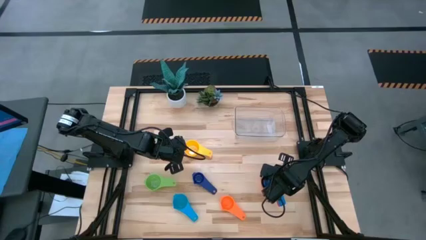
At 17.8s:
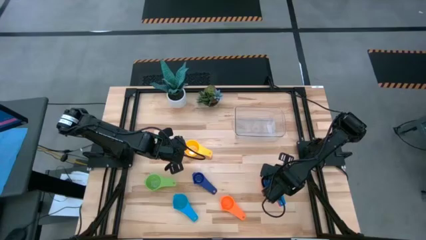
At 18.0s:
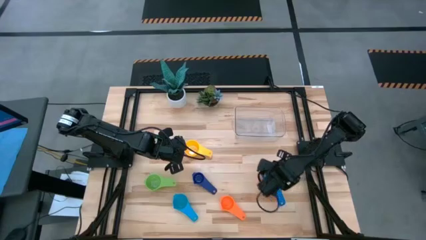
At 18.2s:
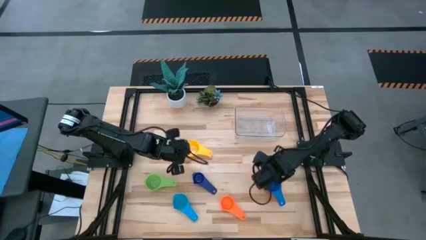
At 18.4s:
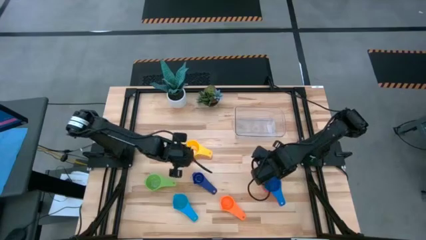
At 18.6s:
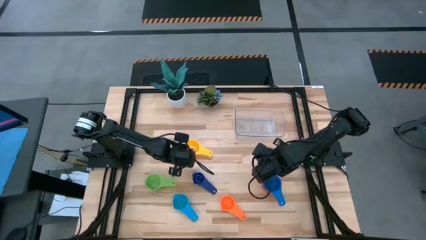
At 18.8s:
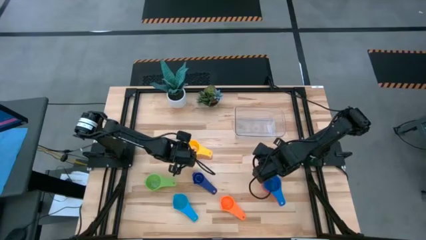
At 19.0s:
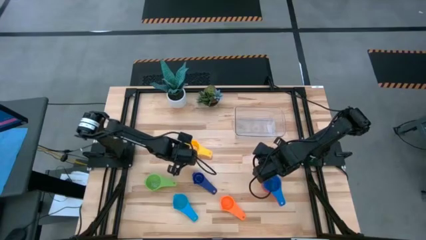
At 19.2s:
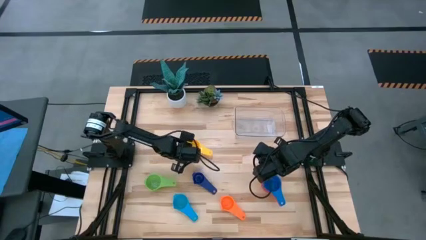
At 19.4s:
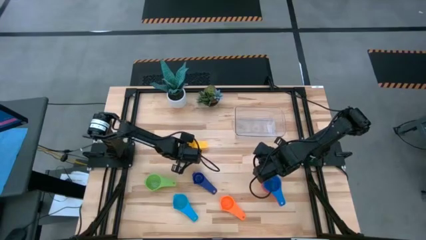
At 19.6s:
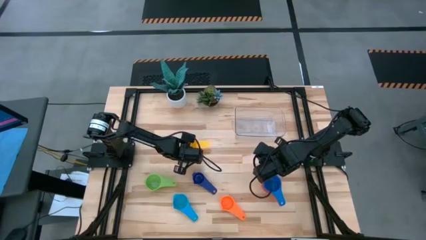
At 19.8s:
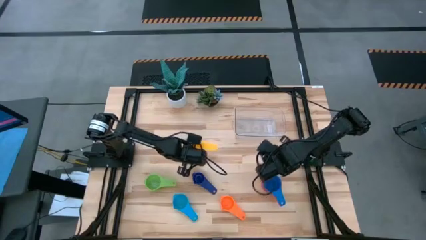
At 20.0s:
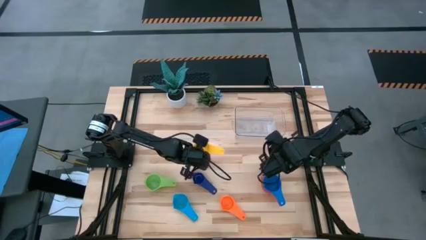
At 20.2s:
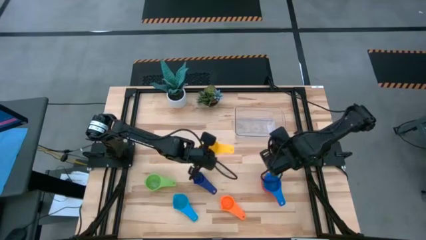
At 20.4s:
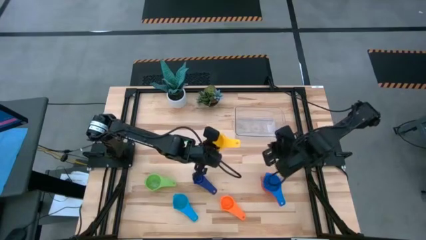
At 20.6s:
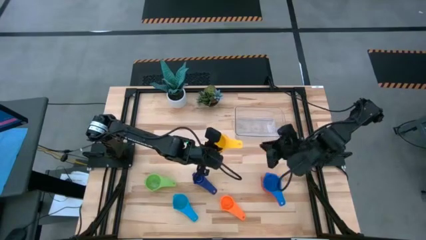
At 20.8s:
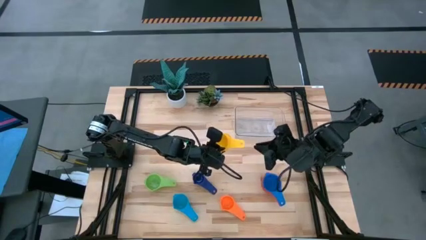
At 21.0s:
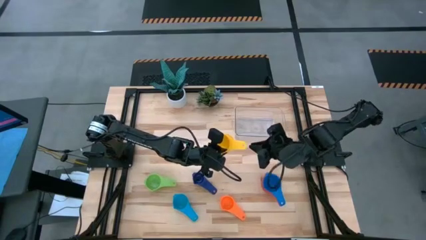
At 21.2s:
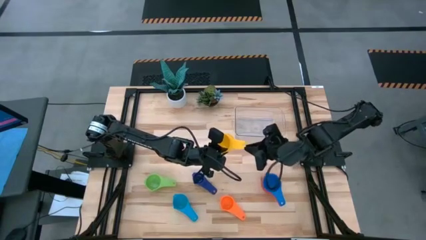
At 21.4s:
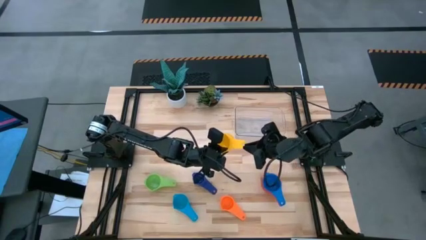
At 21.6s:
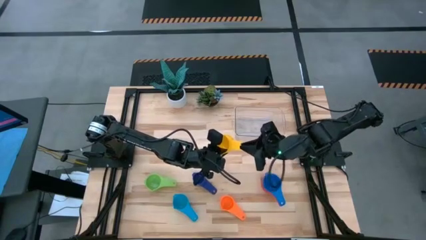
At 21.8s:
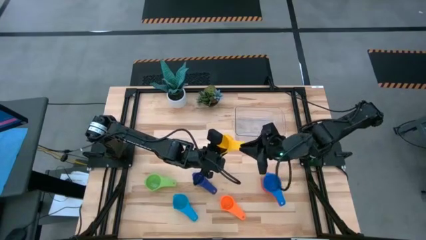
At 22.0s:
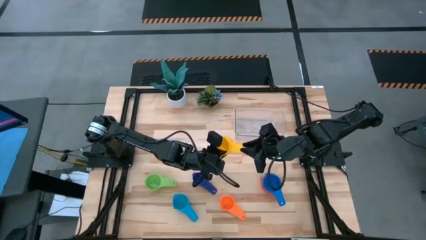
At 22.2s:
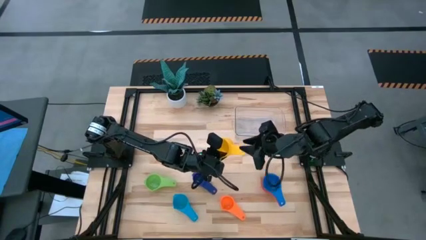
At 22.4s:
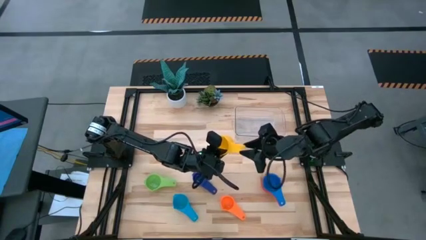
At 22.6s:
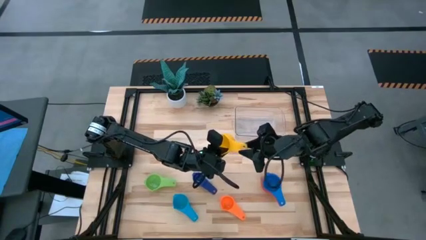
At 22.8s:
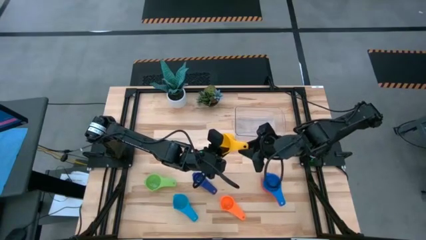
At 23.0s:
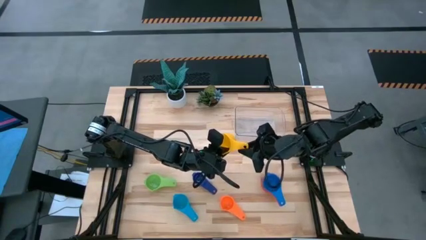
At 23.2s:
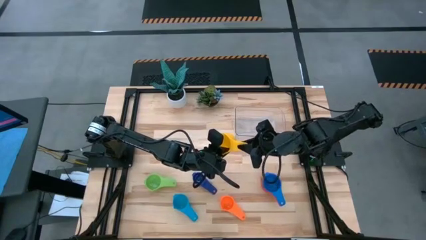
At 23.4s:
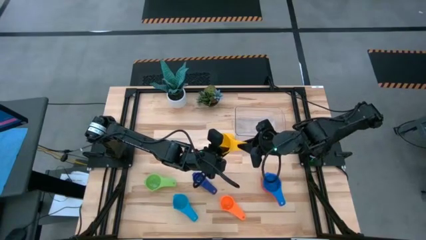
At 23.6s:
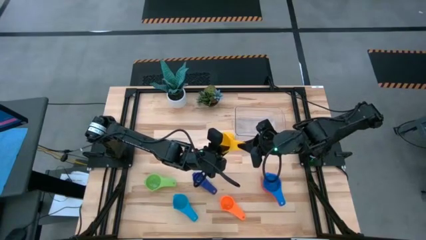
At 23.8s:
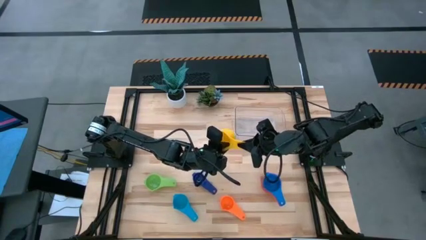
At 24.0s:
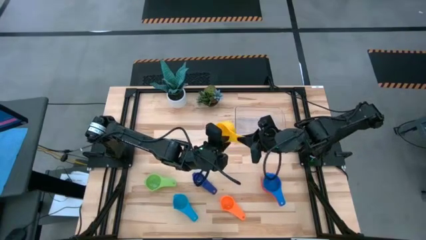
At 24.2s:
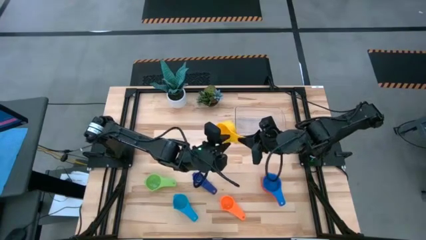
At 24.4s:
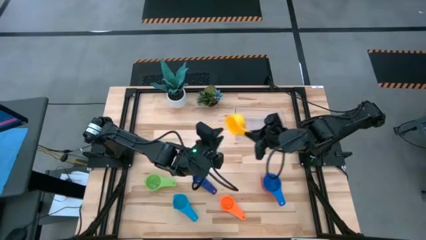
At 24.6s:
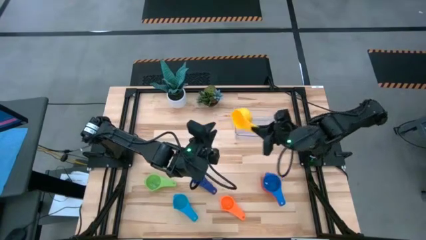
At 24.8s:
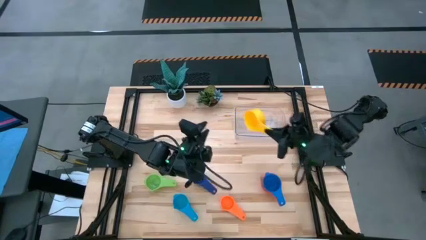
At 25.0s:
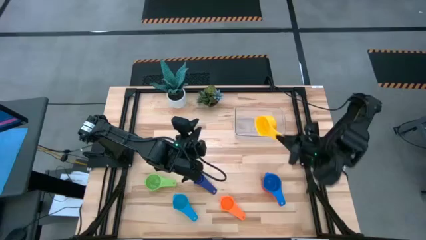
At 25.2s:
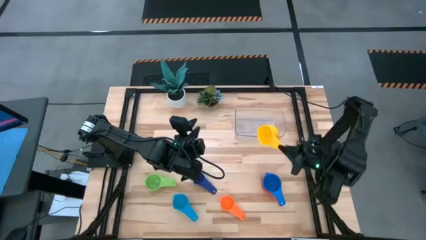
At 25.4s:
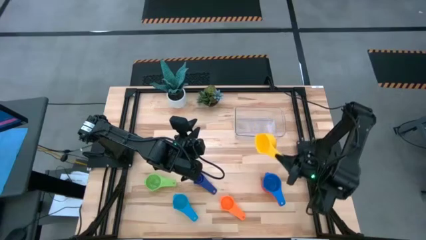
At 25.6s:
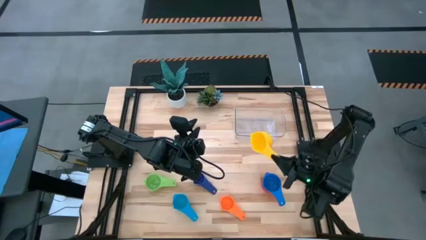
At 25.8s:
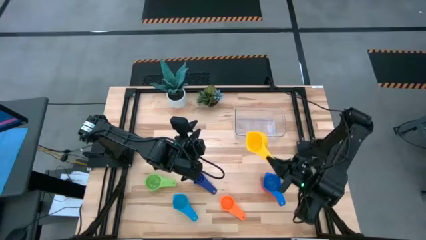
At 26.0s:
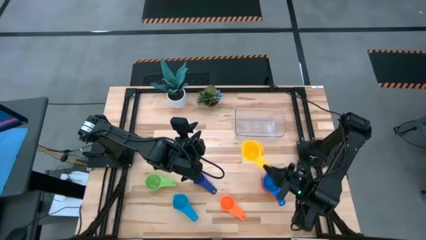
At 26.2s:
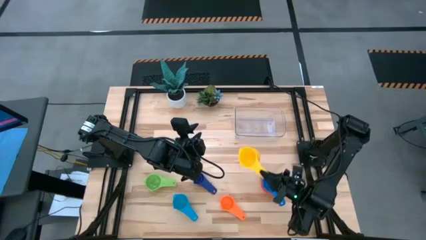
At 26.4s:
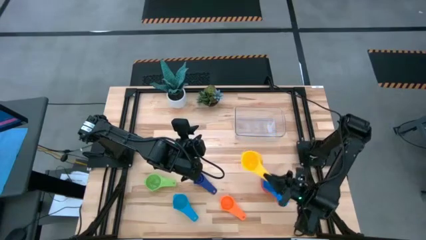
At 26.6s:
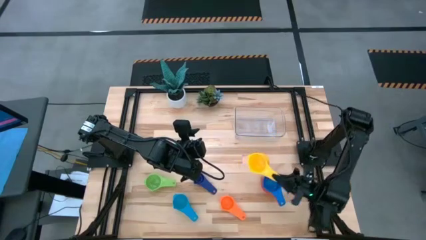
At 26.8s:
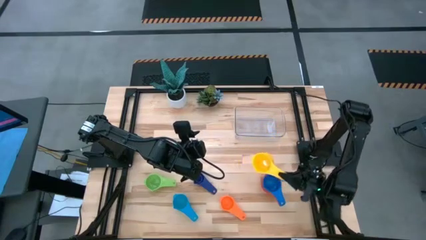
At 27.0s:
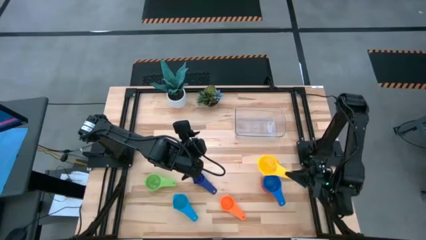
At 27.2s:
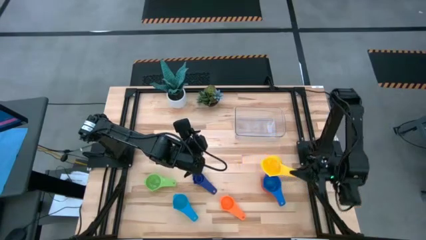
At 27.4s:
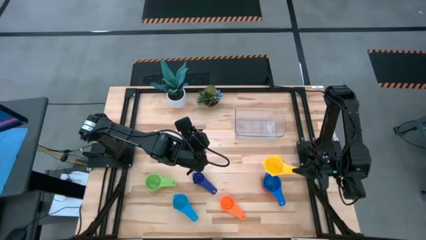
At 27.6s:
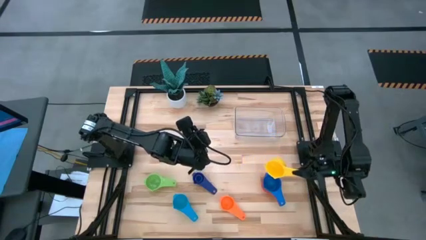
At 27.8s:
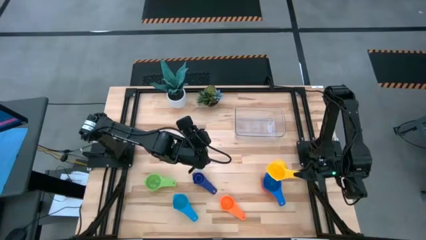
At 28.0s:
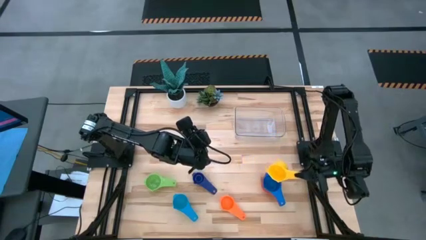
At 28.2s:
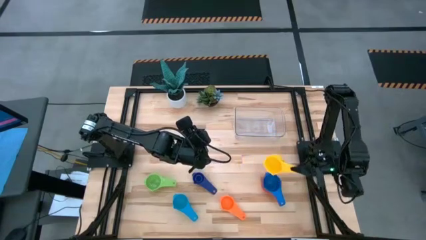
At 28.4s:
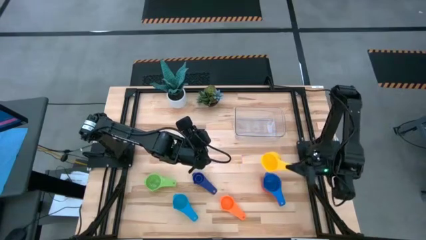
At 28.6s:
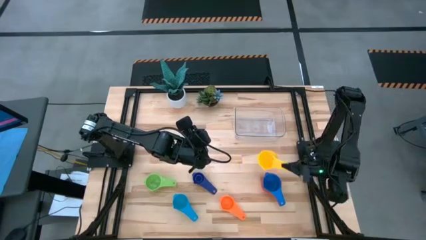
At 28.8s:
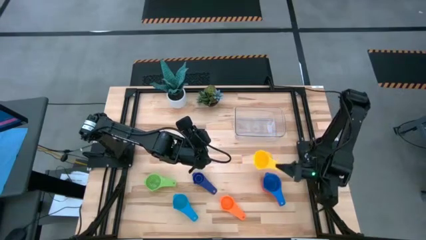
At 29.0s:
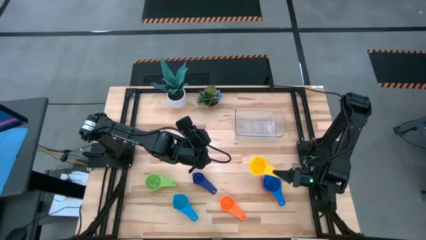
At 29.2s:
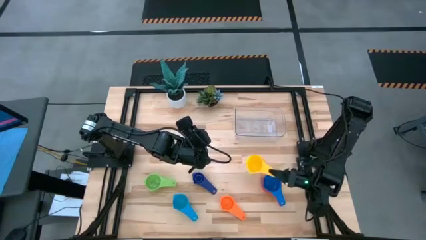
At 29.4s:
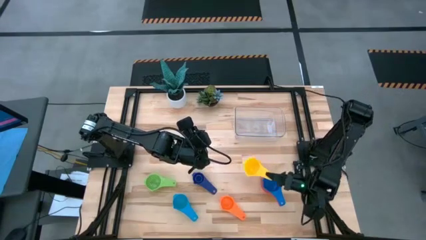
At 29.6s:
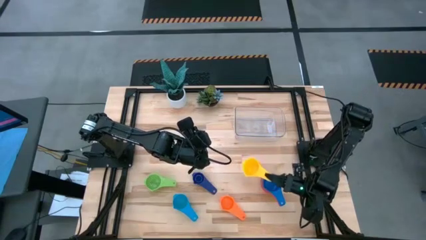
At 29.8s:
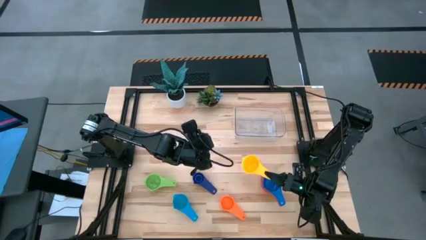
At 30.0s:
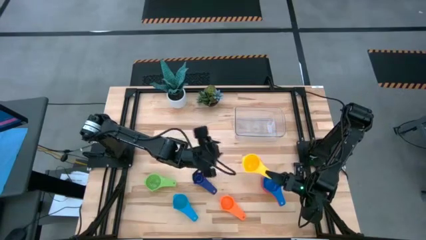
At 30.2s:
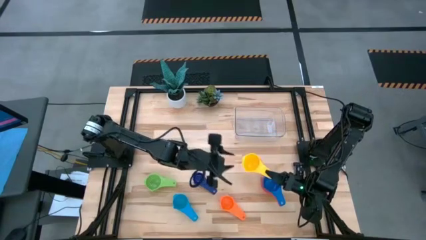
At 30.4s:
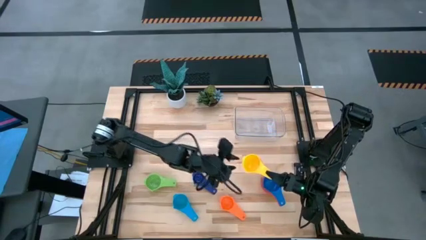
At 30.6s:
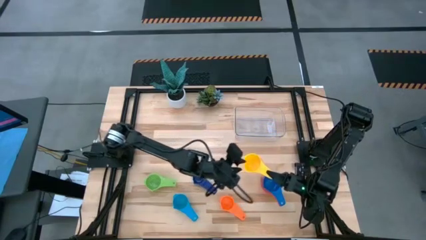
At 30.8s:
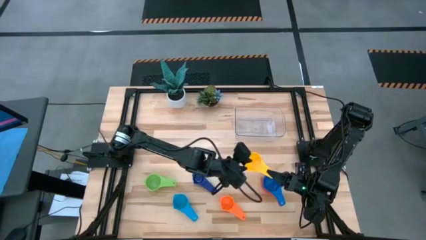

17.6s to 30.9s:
Task: Nest measuring cups in basket
Stack the yellow nest measuring cup on the blue nest measuring cup
